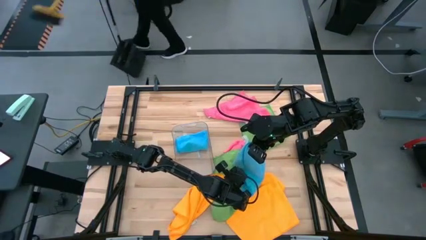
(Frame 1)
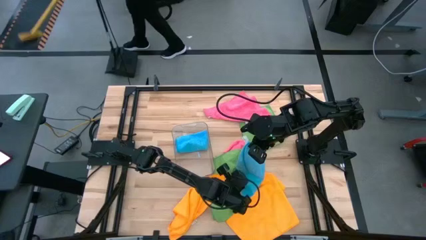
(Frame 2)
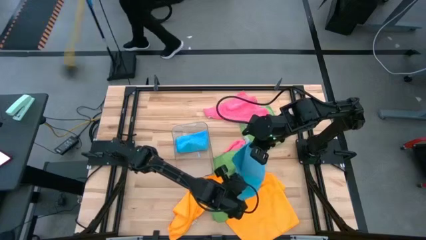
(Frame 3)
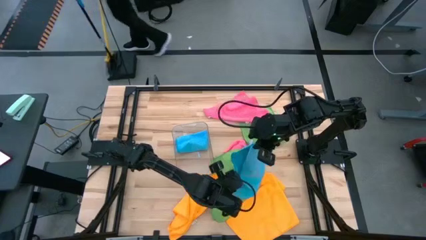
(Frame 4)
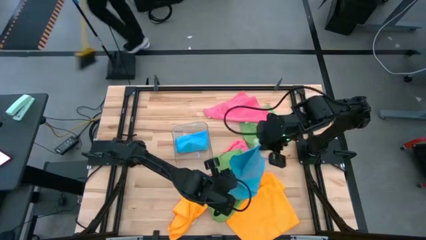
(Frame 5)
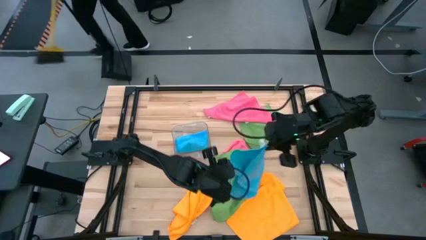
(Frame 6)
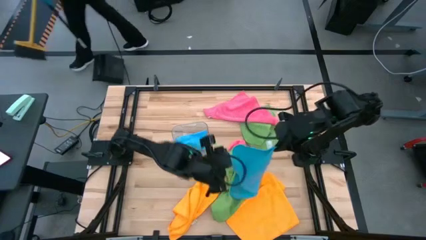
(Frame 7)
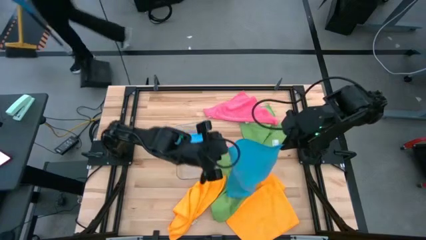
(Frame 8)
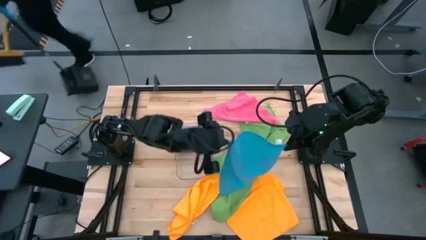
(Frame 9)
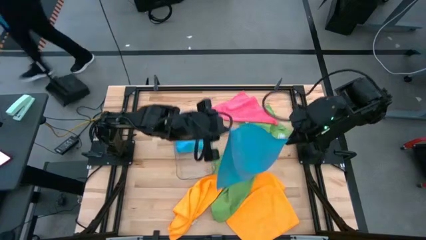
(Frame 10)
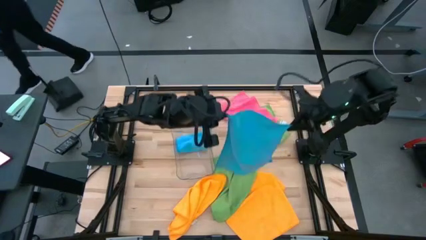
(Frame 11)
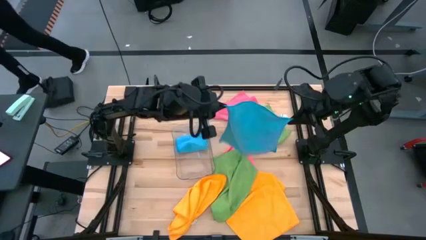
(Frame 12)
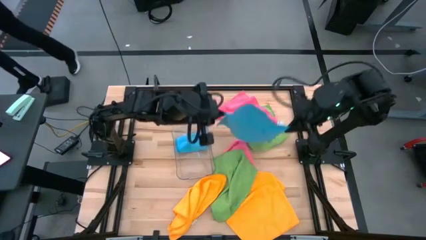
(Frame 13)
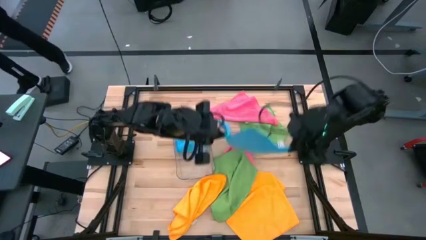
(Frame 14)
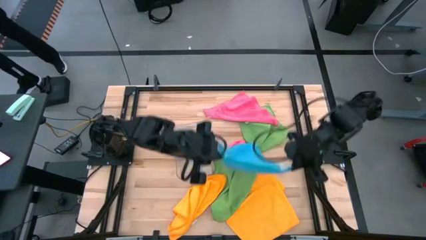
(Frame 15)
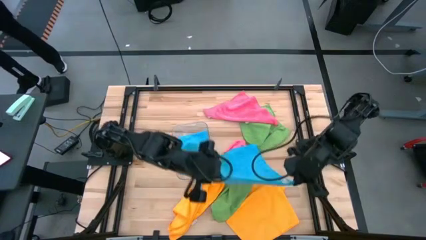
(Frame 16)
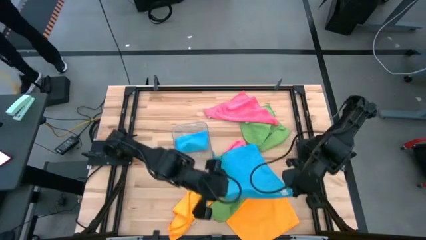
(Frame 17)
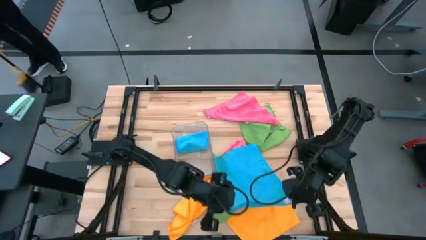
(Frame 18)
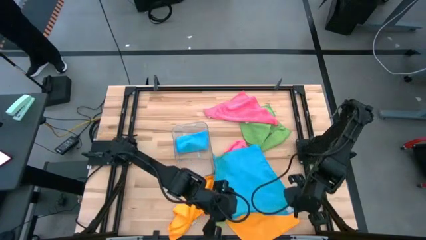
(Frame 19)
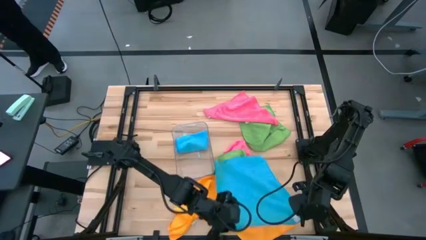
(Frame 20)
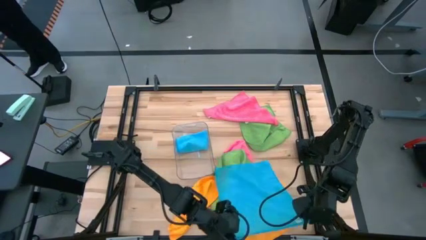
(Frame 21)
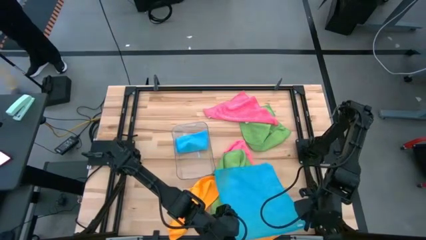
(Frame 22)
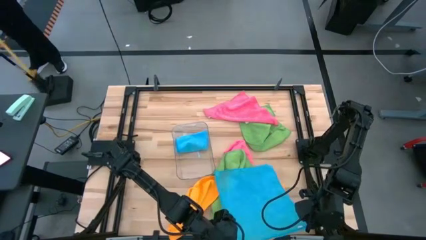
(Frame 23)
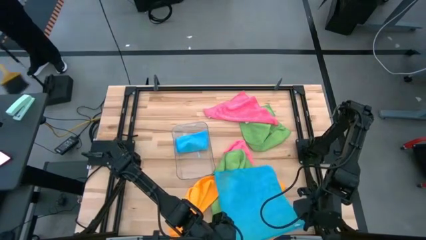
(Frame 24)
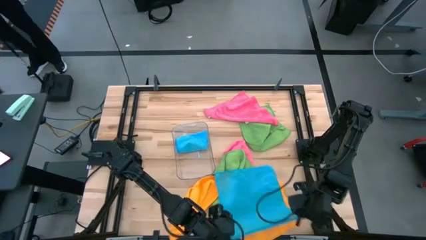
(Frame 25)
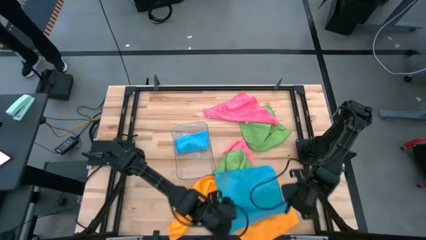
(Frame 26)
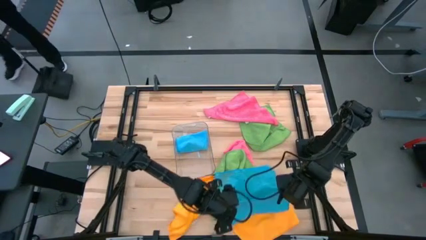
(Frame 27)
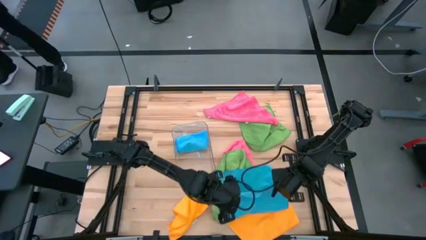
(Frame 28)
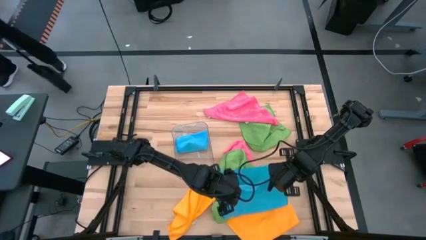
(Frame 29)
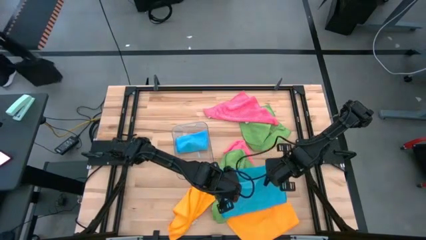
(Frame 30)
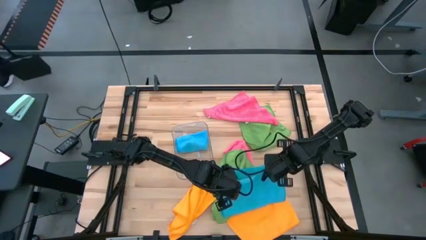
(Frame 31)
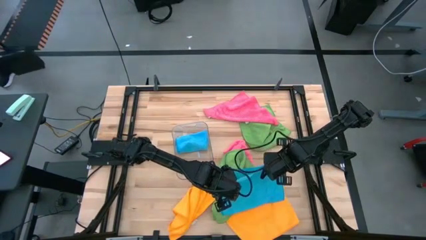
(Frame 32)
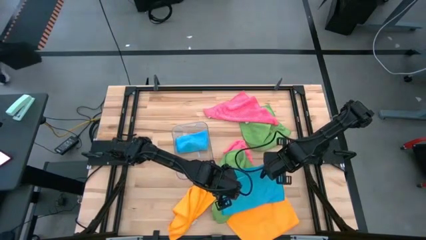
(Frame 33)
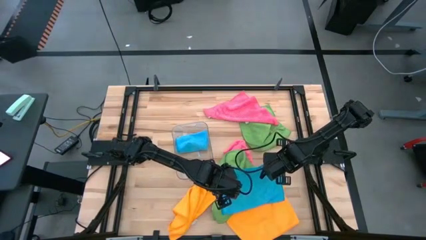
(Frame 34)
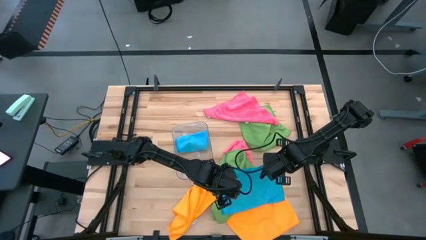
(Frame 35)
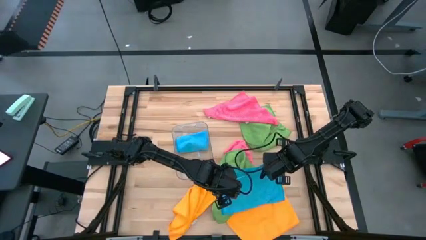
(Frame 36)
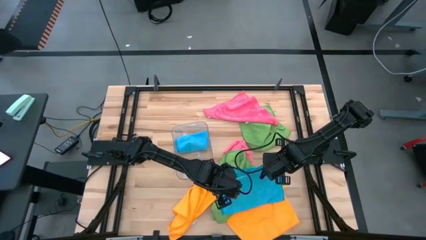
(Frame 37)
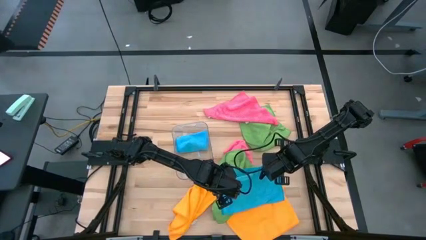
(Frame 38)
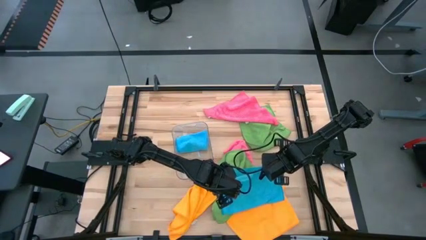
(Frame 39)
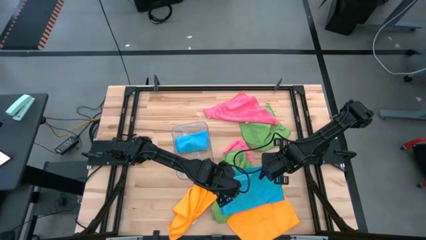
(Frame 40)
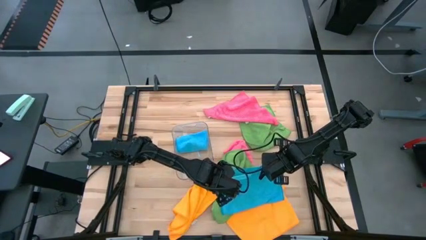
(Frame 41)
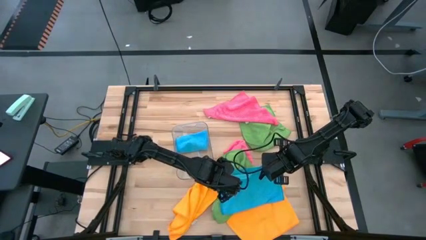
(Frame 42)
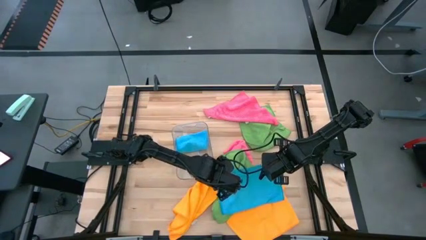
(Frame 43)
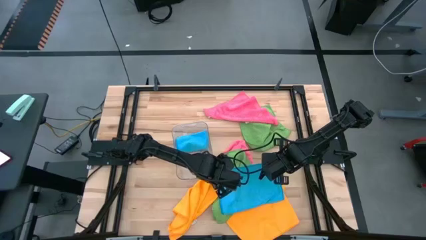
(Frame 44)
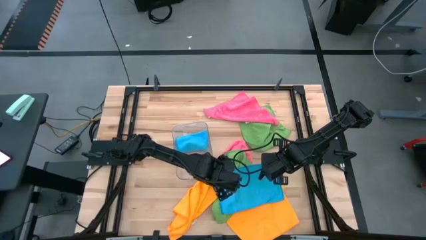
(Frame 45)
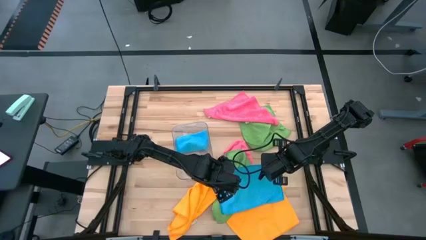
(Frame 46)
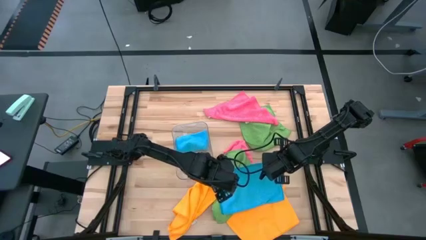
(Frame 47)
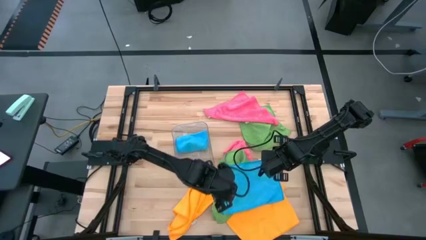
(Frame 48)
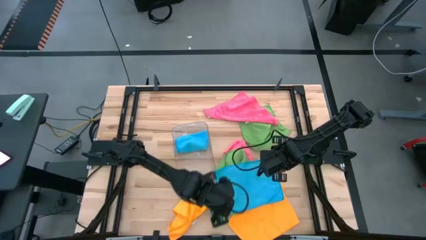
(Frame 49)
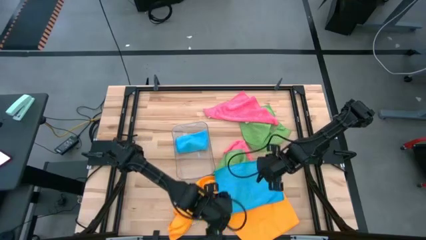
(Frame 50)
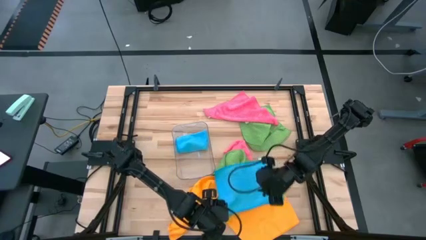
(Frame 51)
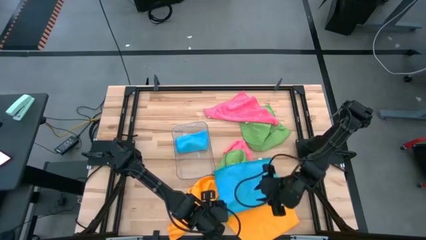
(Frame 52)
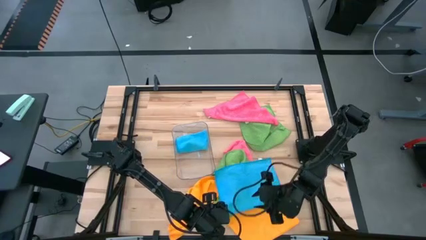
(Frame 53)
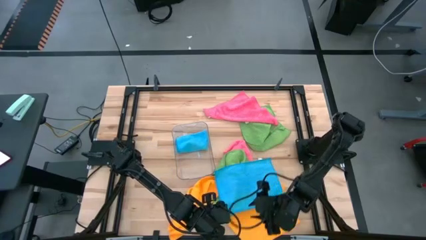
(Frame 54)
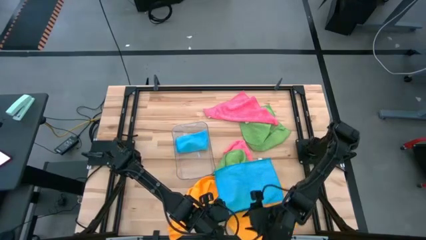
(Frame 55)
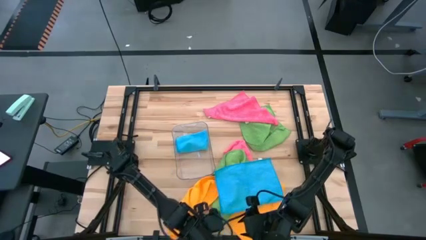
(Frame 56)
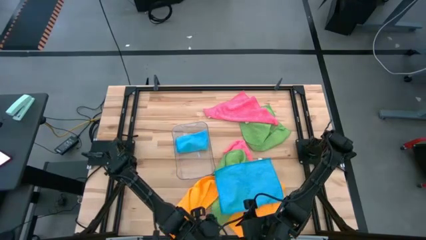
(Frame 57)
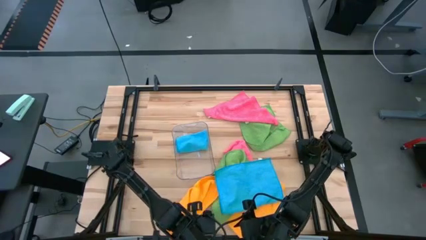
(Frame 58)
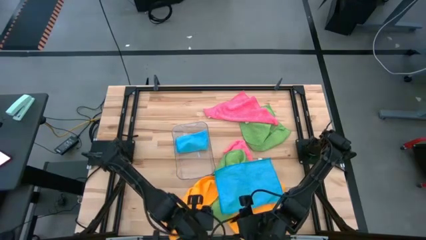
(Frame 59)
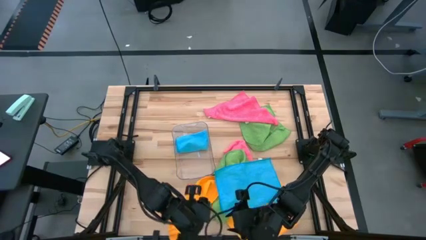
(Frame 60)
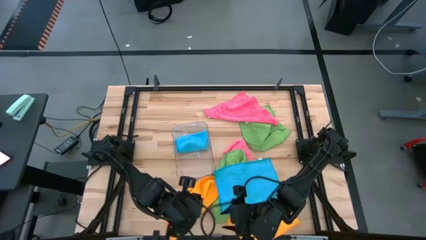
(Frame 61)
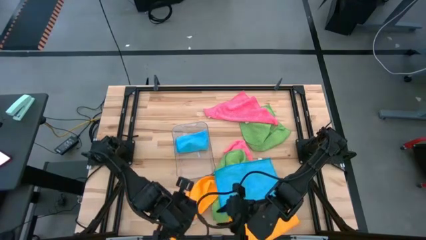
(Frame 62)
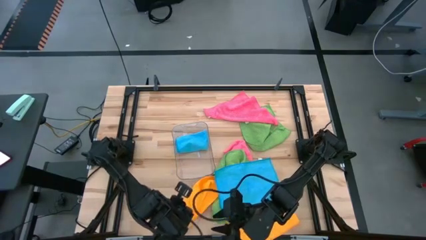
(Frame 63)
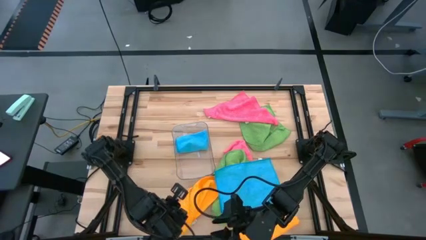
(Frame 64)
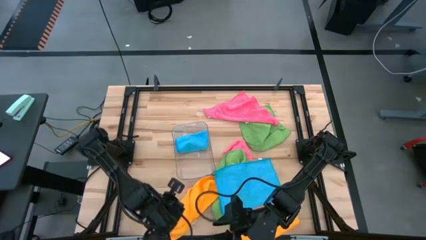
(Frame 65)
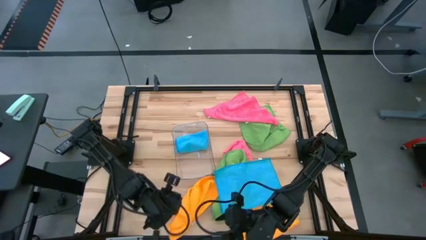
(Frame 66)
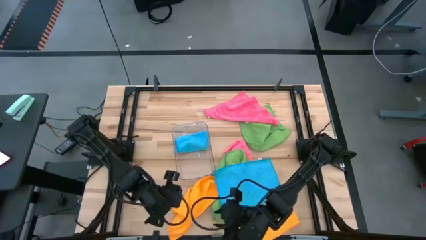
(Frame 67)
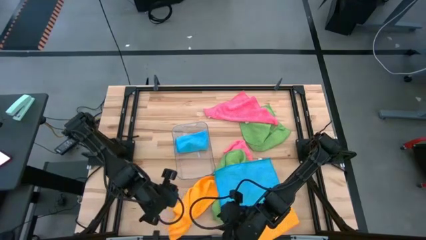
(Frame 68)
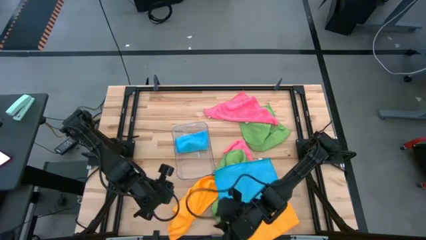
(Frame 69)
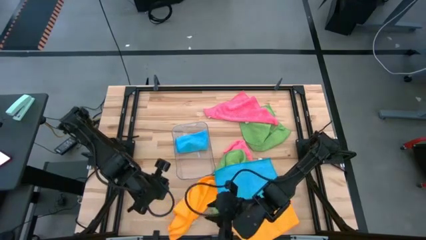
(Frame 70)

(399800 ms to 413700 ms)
Task: Fold microfiber towels
Fold the blue towel
